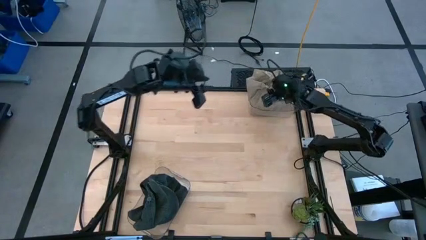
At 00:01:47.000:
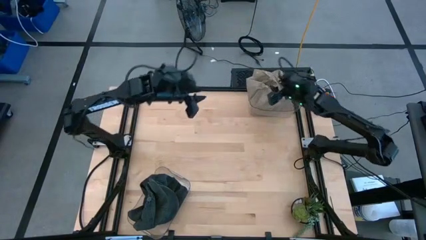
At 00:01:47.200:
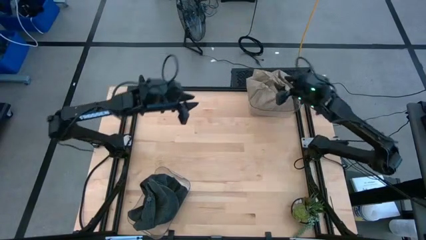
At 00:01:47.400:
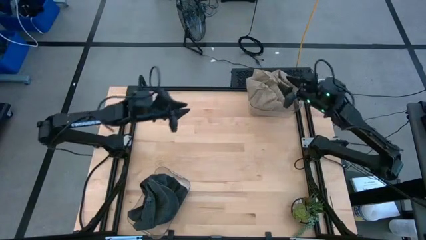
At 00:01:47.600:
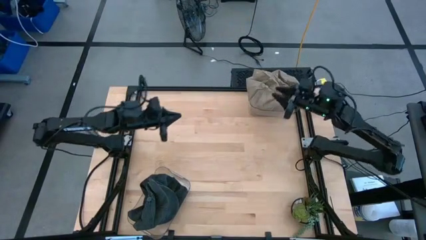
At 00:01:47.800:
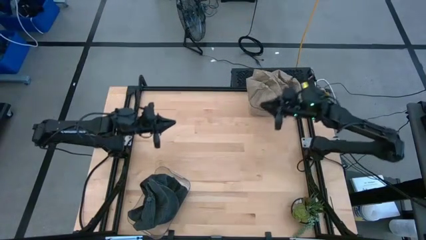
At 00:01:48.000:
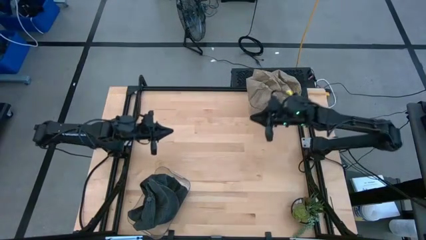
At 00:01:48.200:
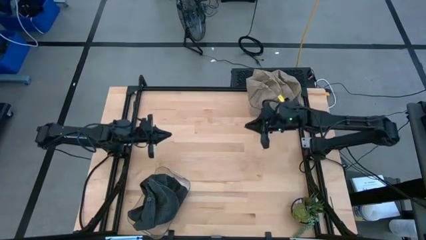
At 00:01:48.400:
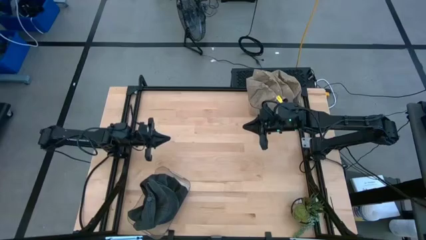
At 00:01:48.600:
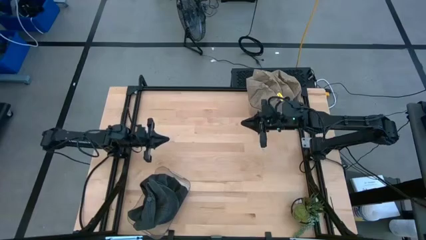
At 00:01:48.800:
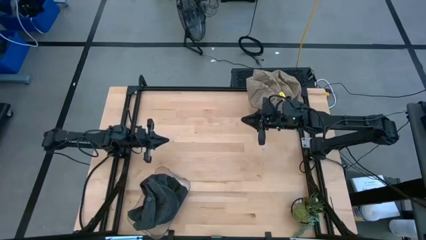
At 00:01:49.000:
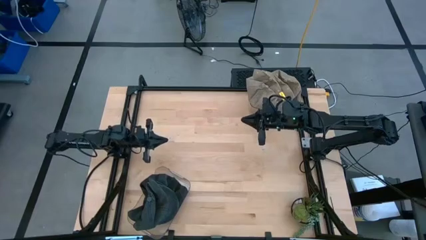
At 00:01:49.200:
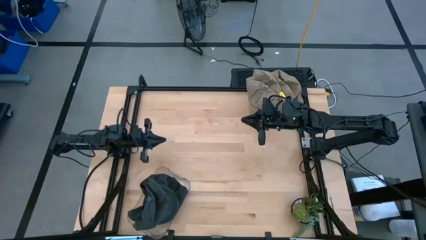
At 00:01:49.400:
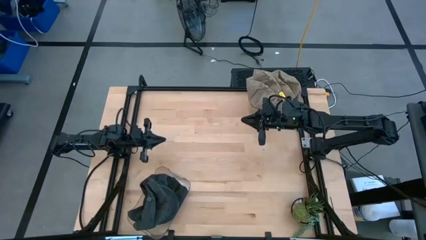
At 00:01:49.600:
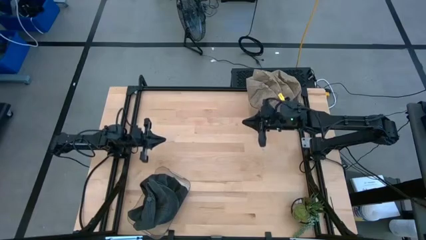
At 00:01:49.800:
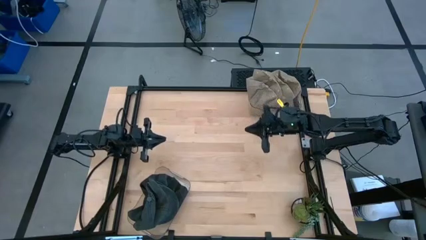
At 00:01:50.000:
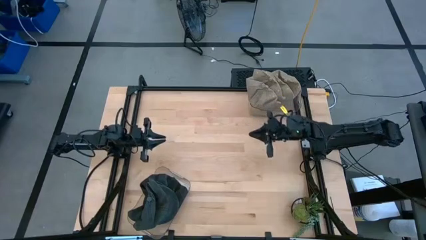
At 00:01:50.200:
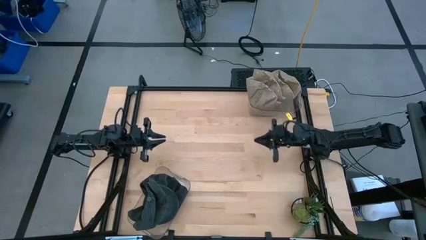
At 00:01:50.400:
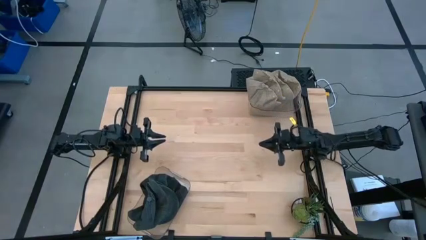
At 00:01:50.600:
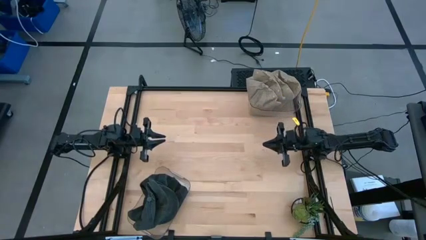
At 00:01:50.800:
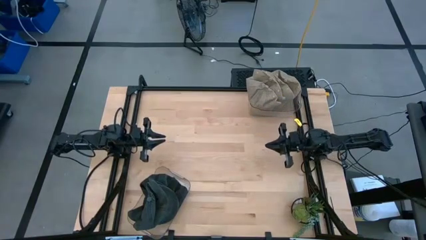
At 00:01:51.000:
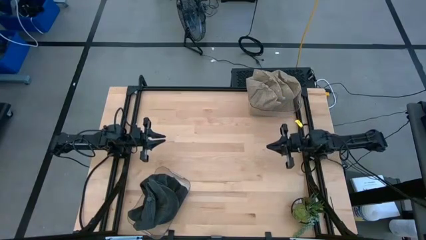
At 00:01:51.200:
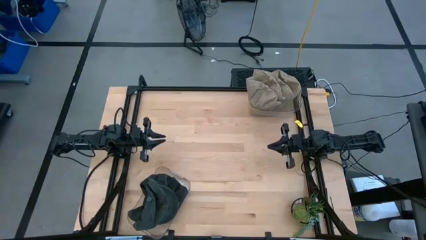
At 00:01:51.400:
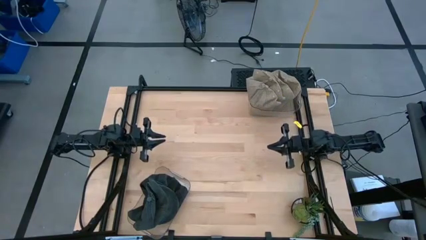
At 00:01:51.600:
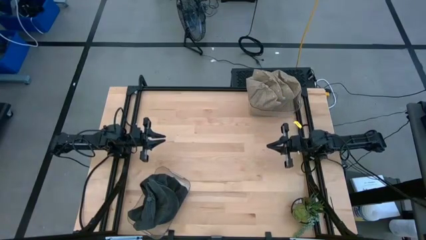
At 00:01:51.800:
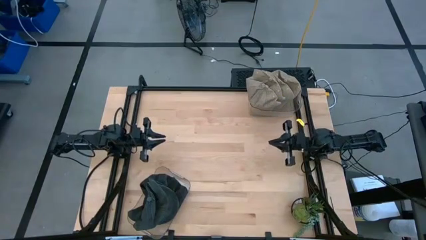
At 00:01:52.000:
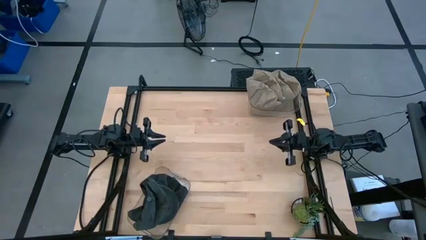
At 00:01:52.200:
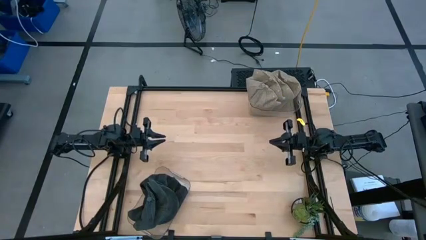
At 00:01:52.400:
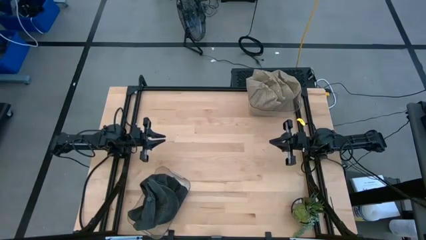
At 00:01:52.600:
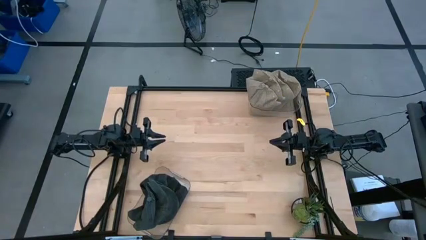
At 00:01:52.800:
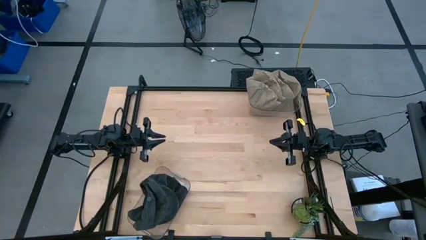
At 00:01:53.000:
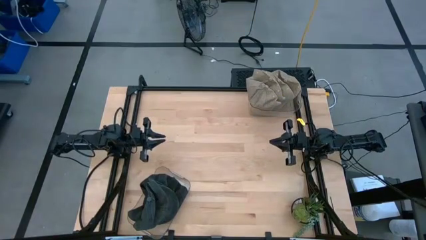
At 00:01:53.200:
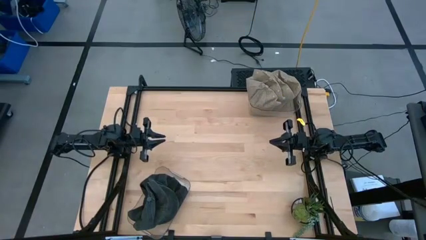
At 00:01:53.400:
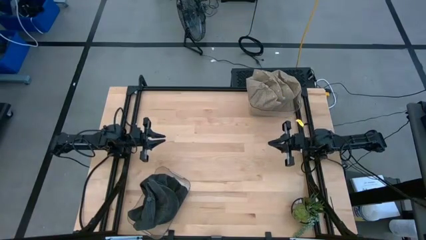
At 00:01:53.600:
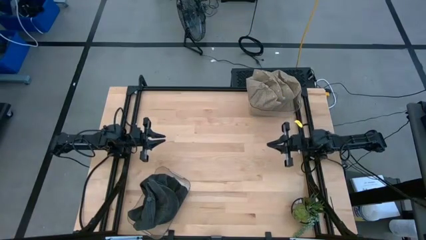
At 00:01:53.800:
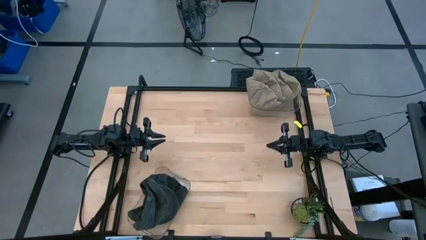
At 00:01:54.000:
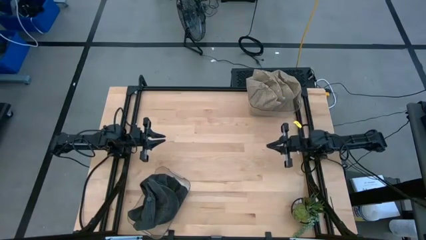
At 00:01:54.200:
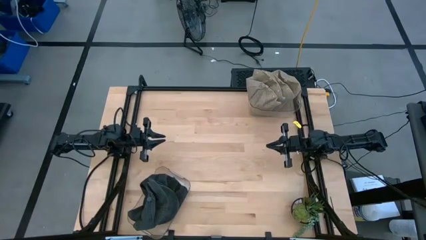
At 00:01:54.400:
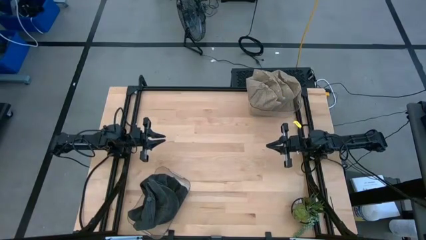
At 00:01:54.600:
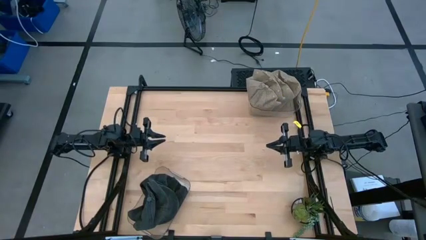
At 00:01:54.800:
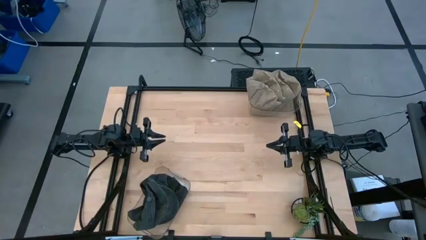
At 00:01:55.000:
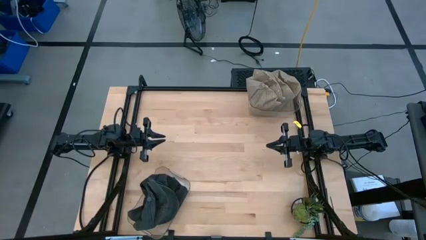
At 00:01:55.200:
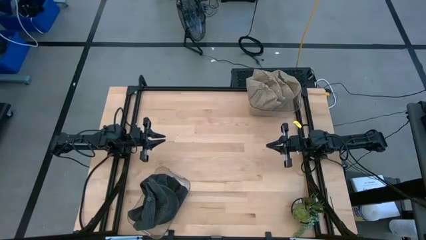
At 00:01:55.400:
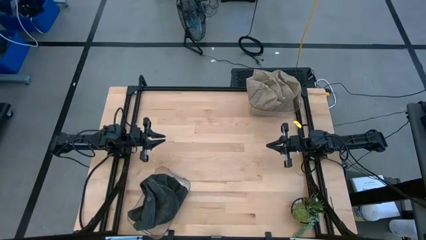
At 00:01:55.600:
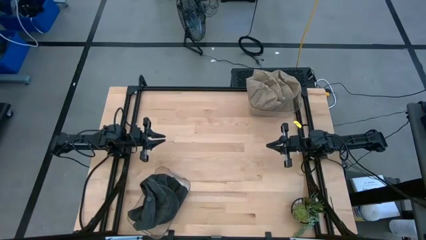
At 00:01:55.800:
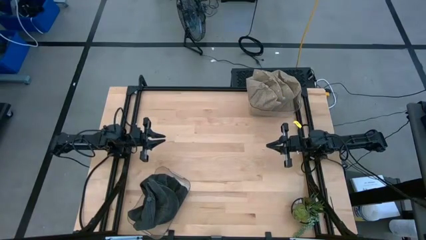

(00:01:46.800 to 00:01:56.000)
Task: Pick & Place hat
Return to Home Position

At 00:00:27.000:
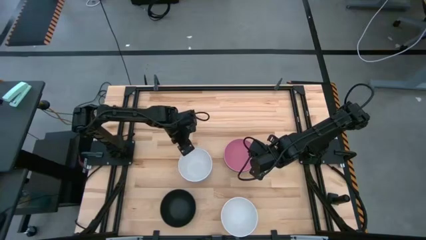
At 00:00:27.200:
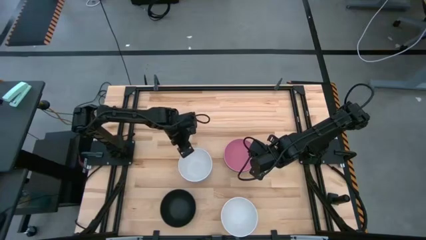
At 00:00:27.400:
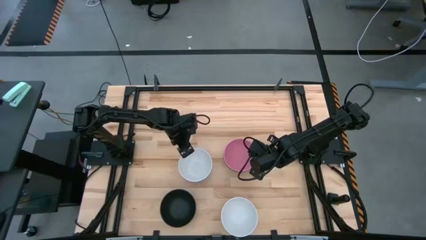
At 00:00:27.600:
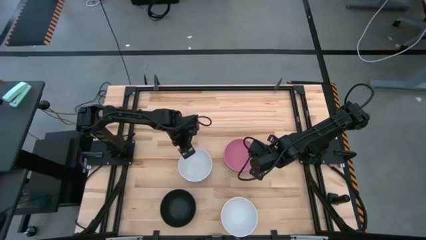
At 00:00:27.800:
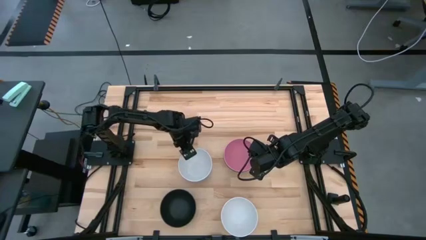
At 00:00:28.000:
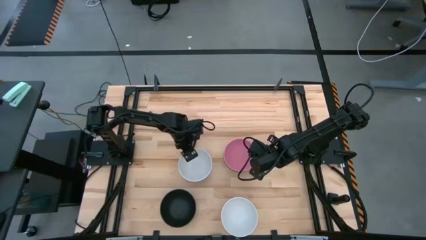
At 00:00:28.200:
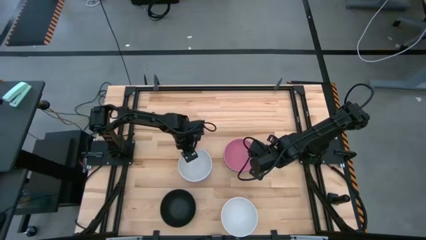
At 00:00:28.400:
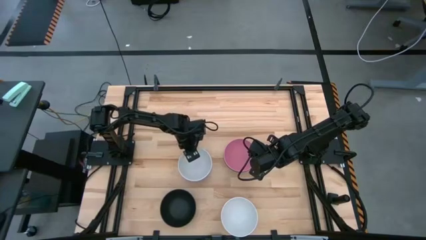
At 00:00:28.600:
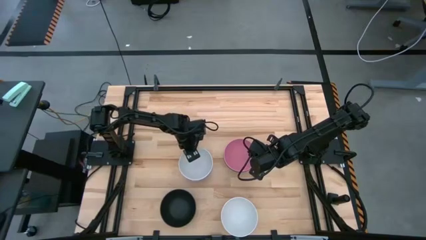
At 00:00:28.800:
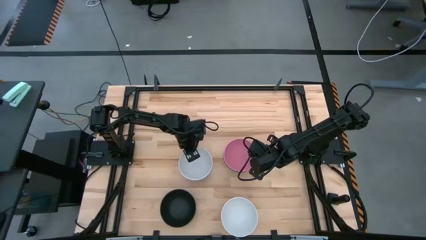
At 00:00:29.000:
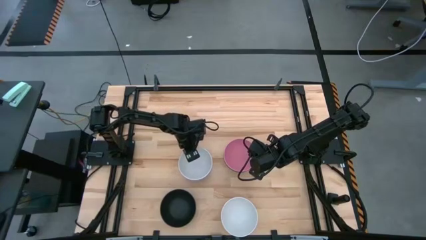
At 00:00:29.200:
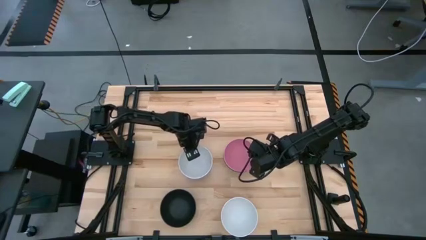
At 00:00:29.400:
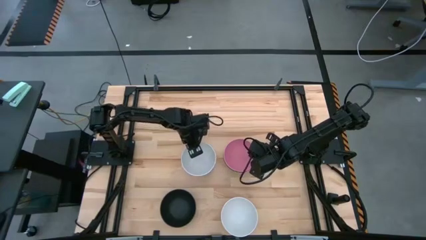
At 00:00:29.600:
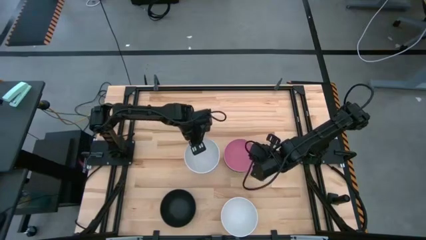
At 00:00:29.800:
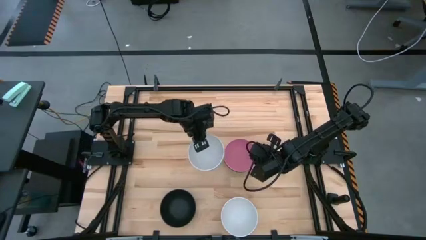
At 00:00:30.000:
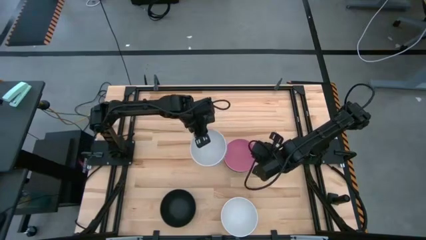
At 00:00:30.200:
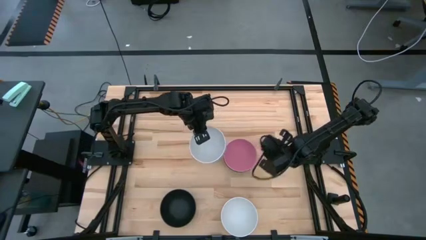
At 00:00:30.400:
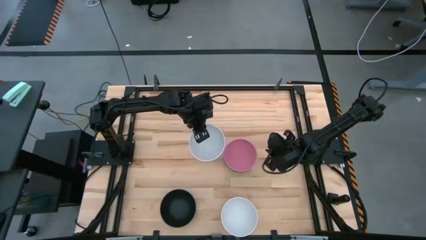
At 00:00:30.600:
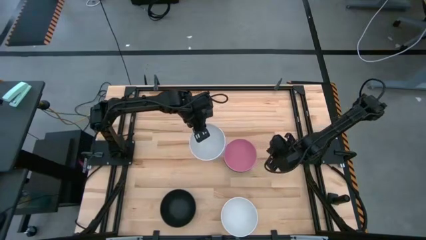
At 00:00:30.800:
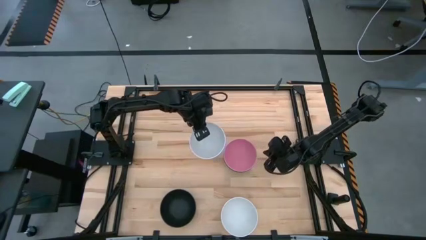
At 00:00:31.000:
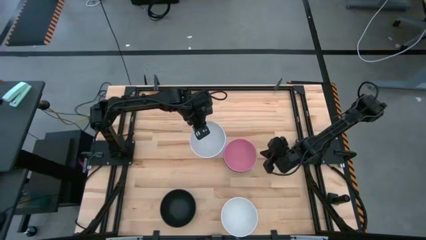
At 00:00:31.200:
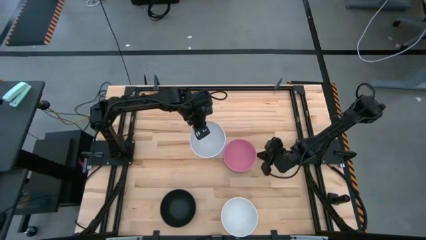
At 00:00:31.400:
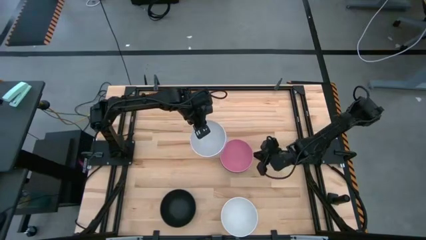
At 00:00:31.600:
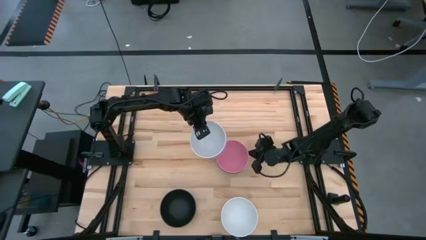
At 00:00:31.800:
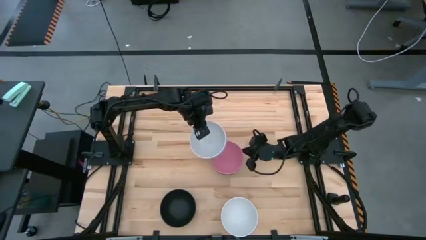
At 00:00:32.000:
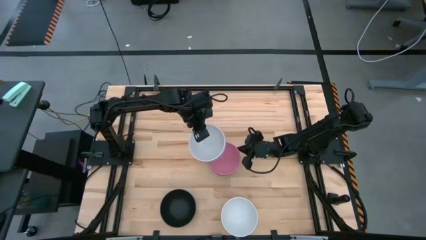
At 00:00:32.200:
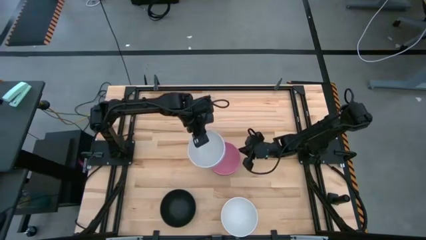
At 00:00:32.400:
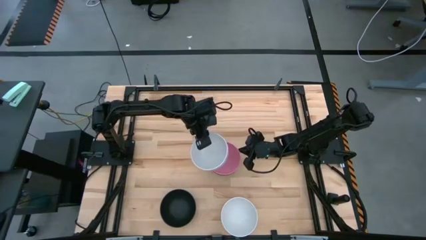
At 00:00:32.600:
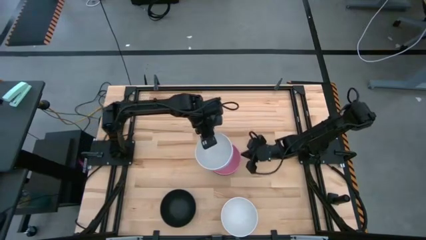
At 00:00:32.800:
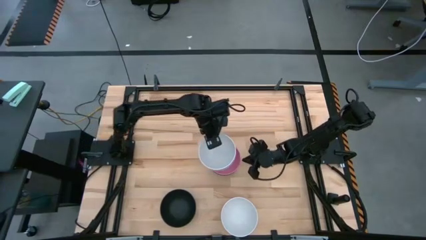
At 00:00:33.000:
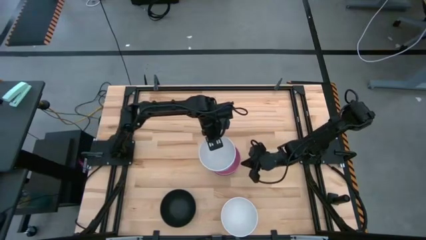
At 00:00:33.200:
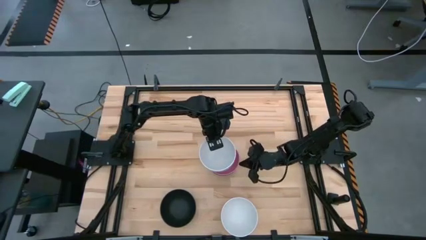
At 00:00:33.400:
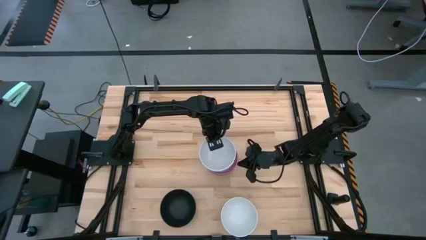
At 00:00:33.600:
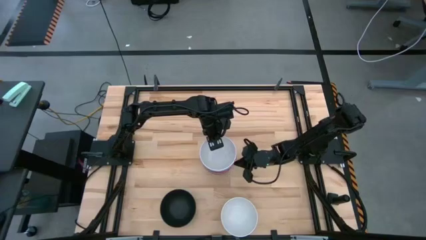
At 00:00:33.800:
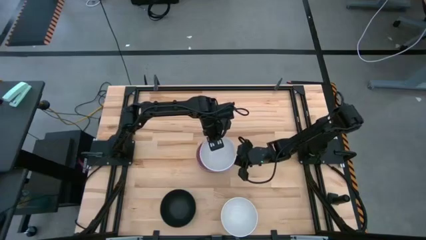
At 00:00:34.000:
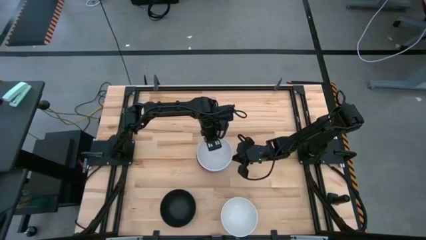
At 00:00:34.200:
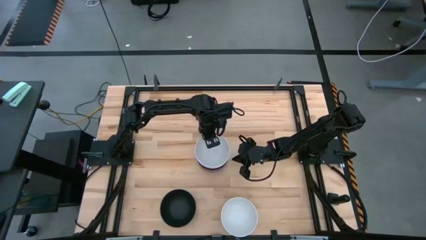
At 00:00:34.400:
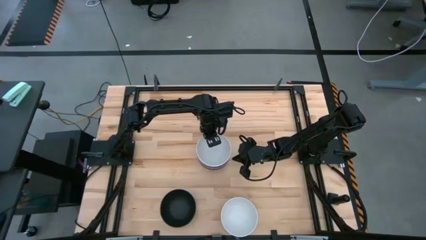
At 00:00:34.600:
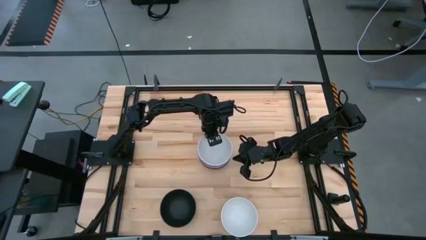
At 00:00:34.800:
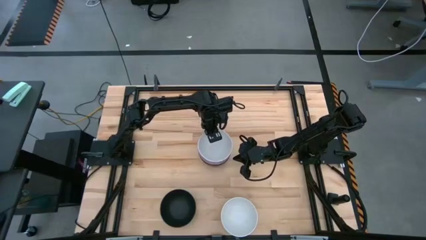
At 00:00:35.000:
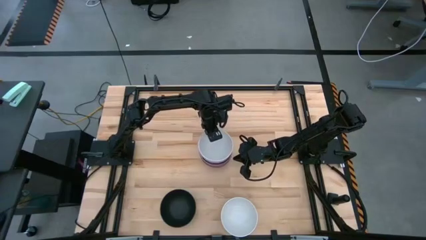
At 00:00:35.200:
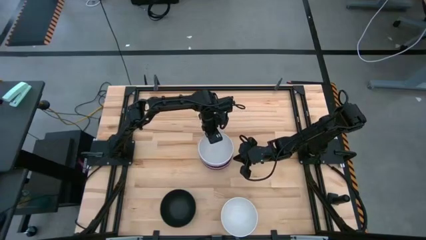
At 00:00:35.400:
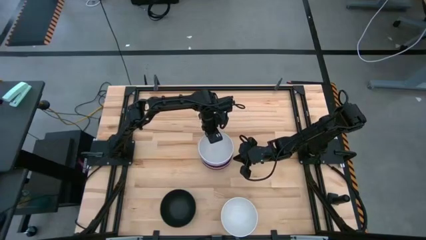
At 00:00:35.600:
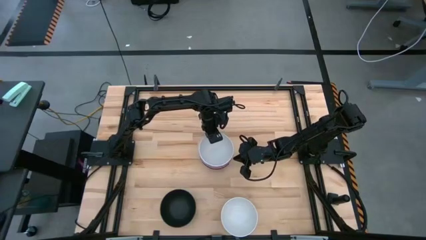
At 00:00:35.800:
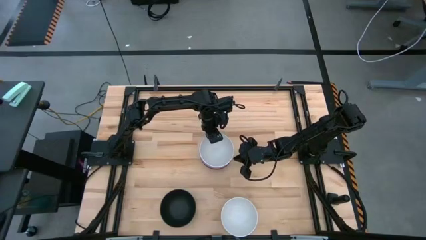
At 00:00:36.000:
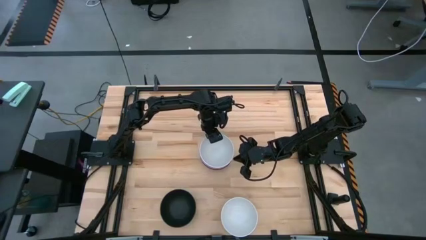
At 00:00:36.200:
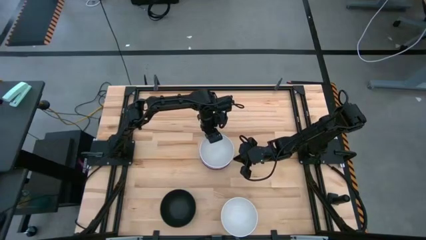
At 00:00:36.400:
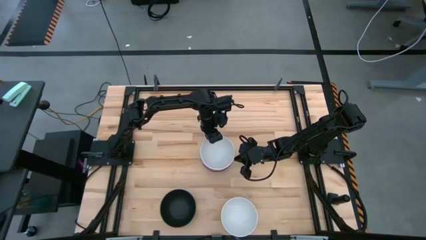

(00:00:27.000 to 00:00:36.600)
Task: Nest bowls inside each other
Stack the left stacked bowls on top of the right stacked bowls
